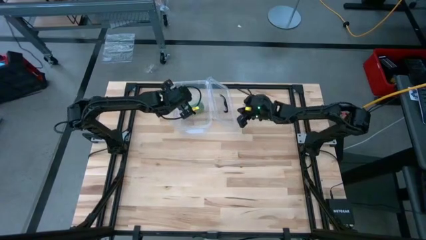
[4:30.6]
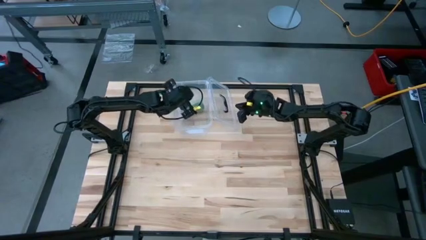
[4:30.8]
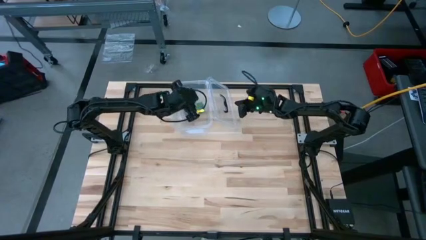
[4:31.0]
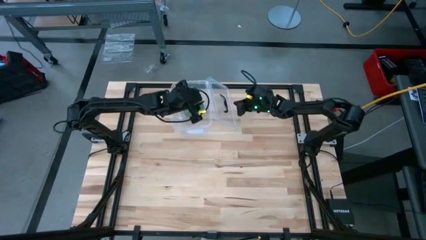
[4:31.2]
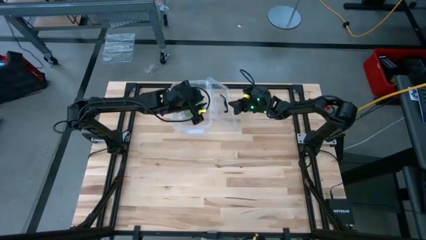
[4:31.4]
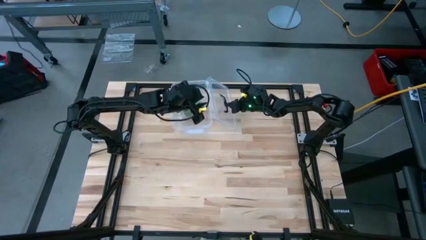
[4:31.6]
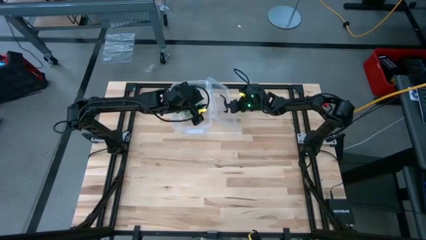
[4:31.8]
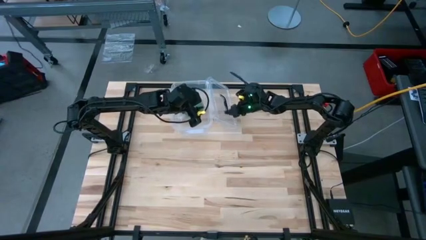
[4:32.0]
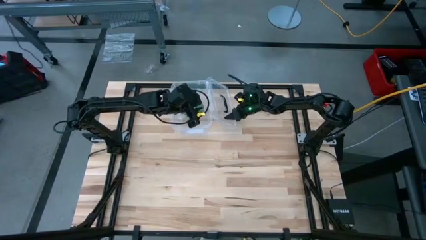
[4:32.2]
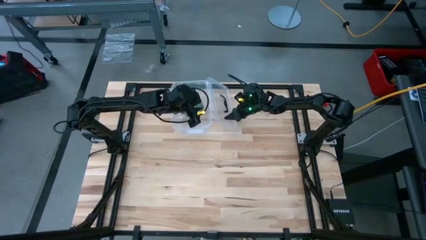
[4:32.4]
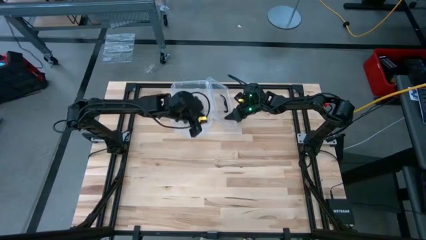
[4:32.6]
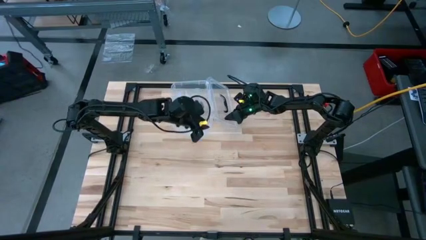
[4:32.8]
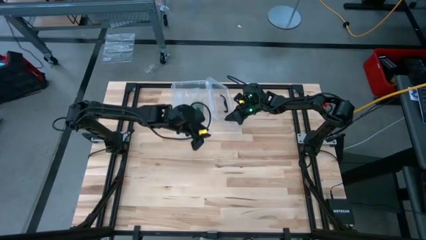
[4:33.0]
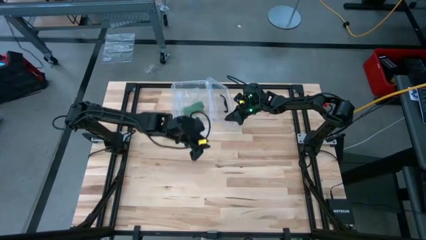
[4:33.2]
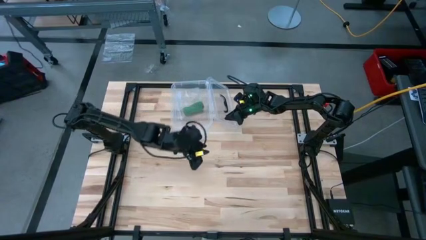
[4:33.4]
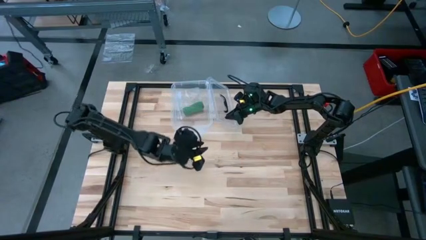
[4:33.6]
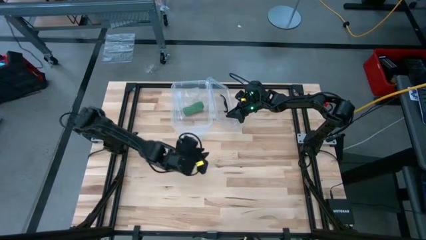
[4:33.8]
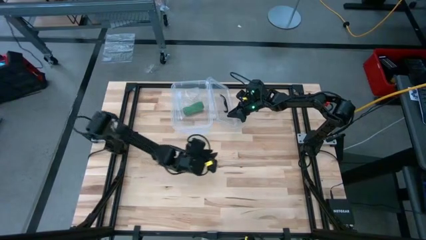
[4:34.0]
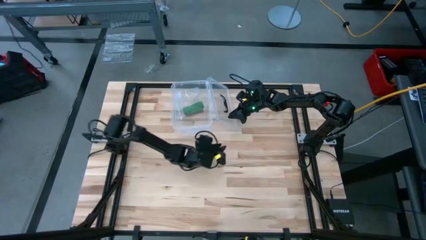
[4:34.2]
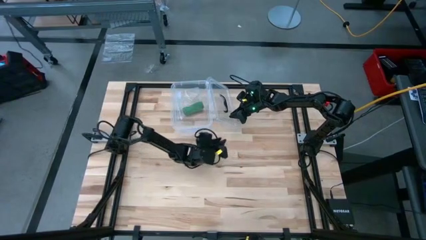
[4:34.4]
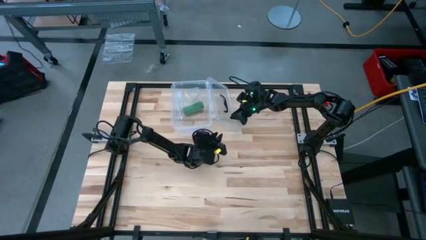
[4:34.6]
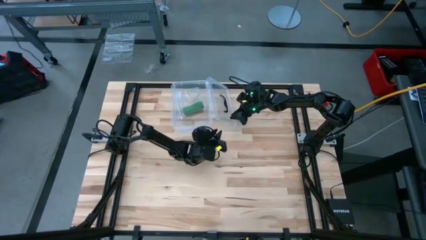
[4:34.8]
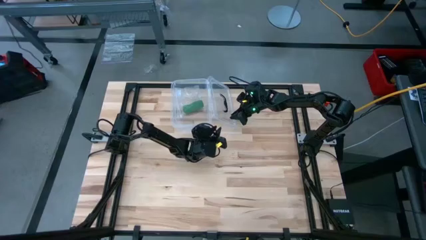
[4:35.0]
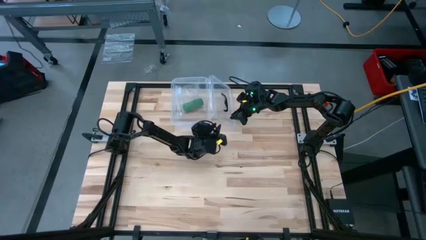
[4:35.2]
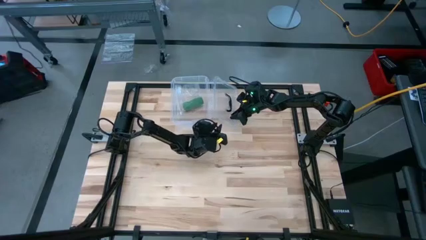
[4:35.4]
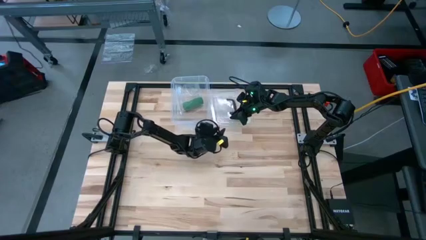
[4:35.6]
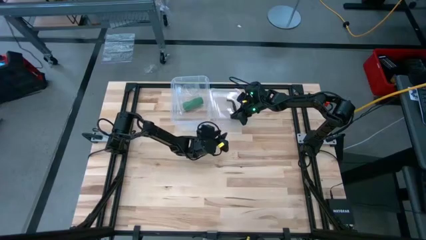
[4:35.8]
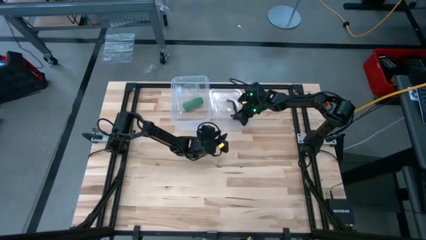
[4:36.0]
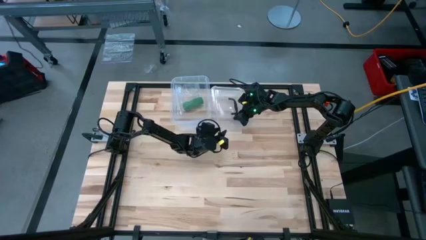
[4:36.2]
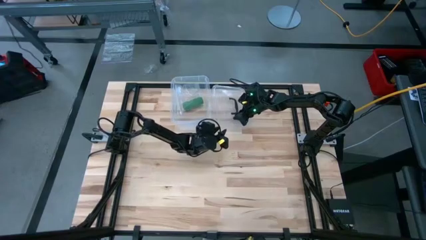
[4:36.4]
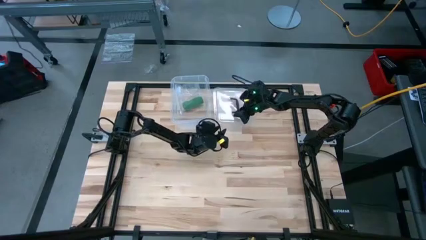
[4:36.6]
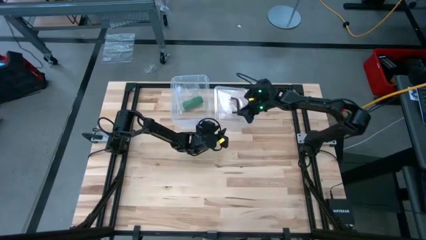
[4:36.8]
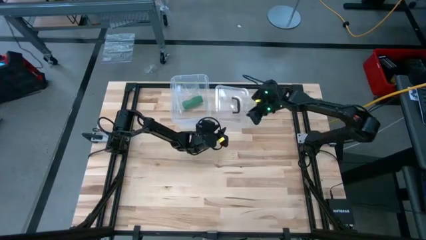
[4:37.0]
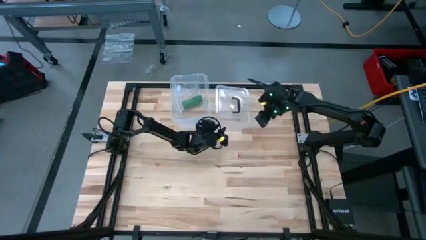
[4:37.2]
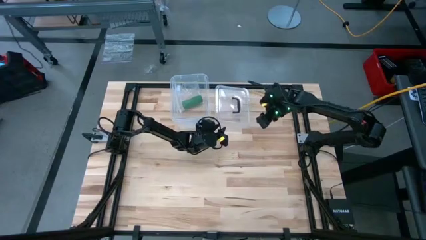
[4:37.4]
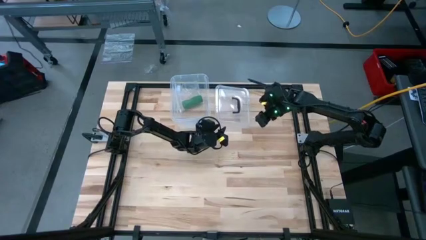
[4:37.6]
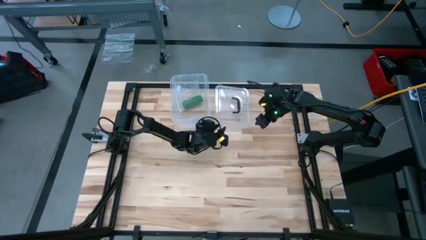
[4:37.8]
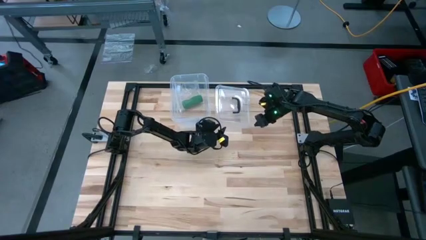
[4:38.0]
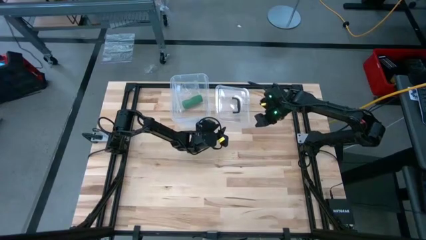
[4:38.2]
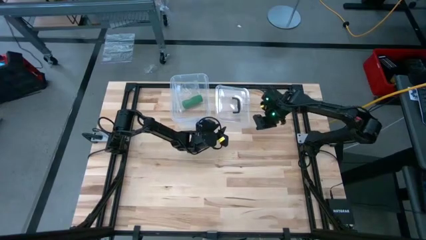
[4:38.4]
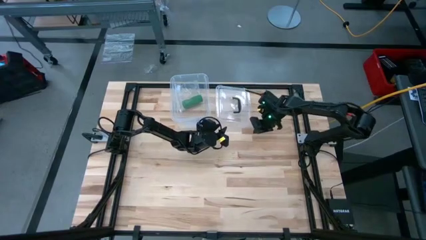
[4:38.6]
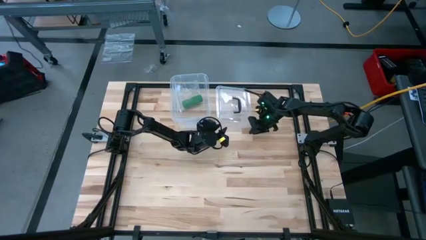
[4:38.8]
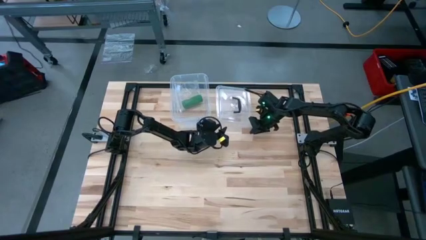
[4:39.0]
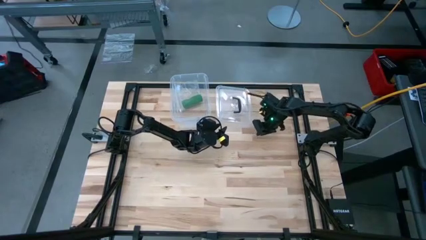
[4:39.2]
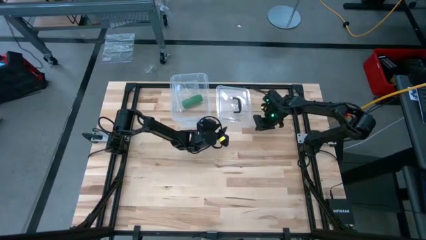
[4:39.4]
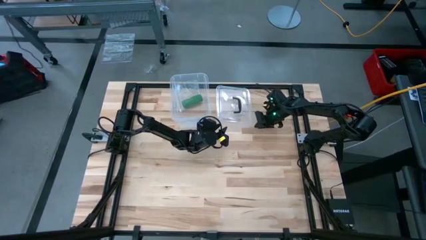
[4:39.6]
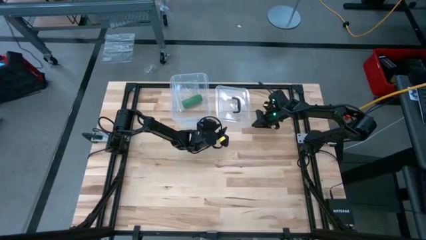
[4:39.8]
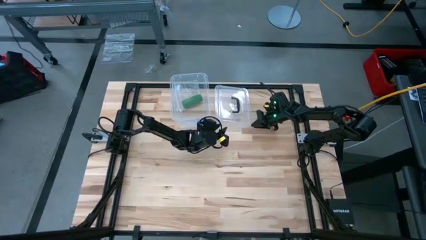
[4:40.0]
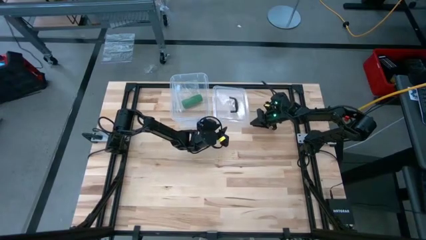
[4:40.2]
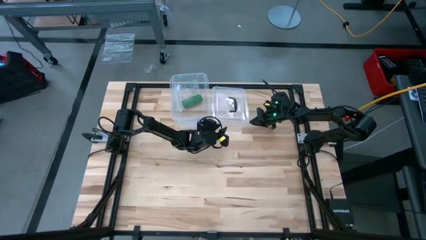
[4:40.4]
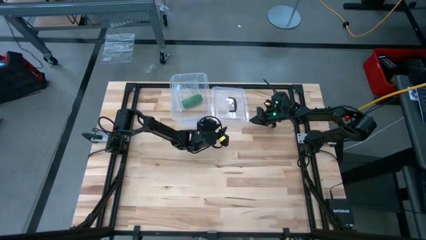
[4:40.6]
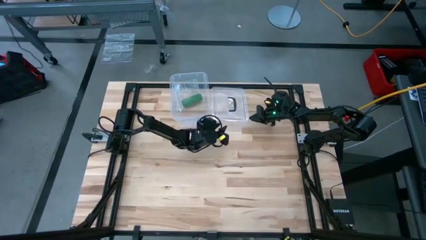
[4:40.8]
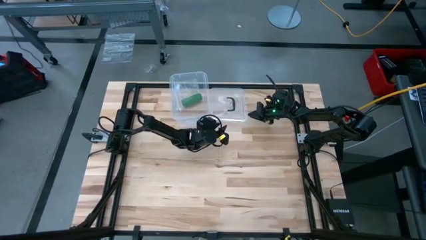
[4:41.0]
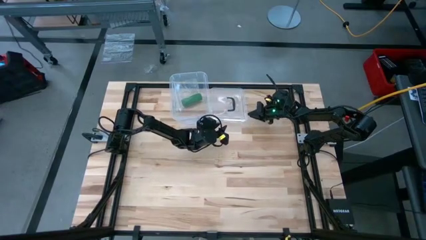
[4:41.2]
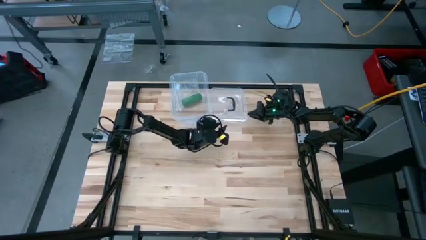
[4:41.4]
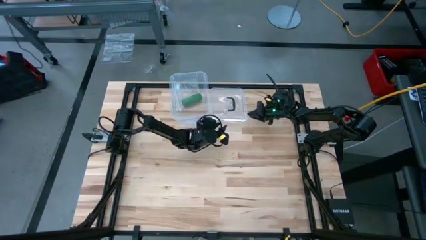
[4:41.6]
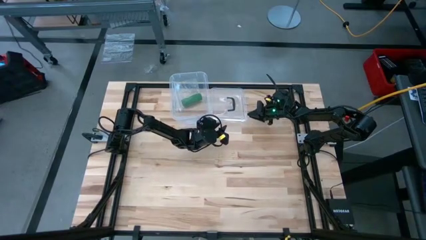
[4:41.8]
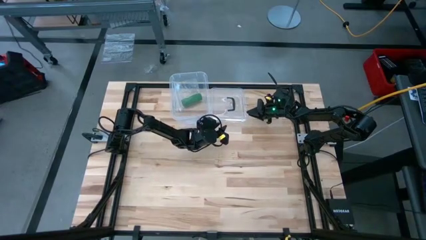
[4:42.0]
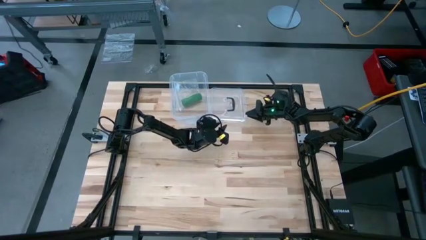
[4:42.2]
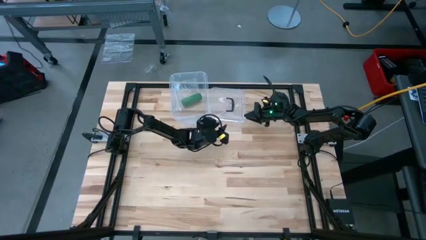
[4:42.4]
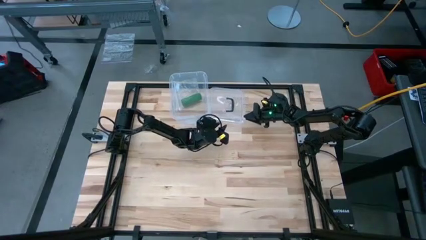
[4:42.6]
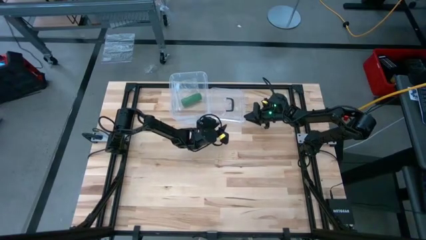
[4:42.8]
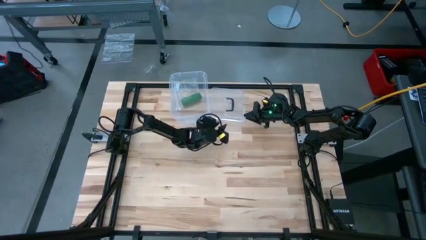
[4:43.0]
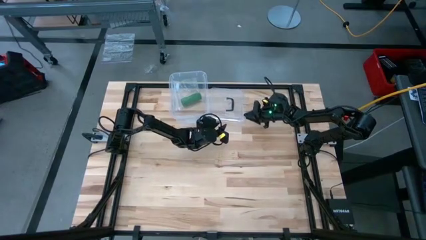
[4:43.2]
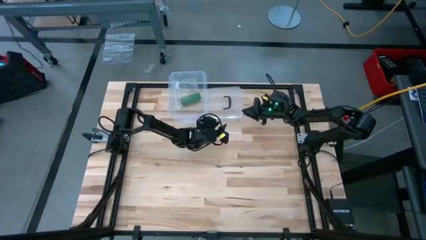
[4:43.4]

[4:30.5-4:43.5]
Task: Roll bandage
Close the transparent bin

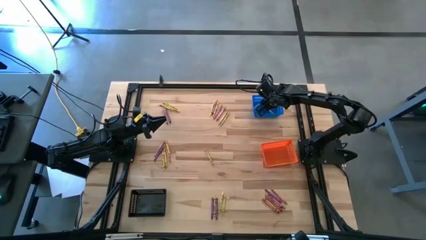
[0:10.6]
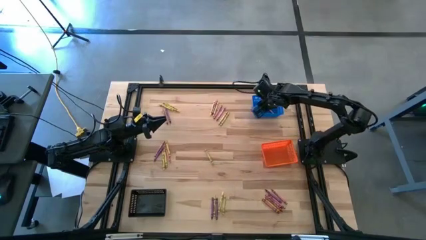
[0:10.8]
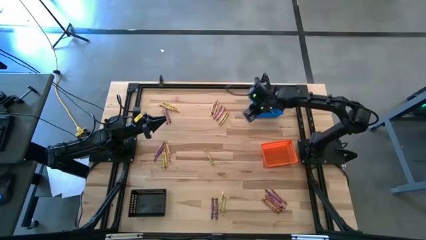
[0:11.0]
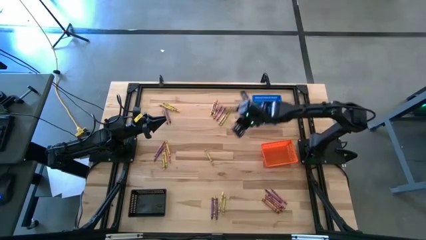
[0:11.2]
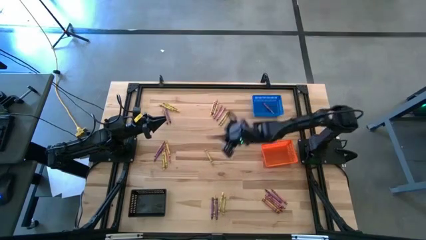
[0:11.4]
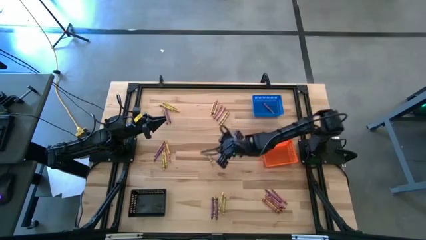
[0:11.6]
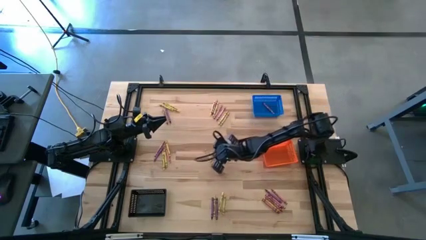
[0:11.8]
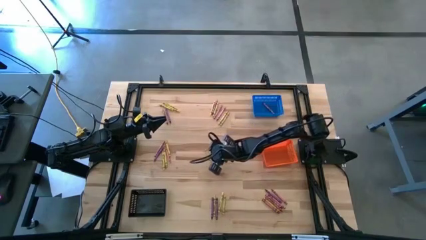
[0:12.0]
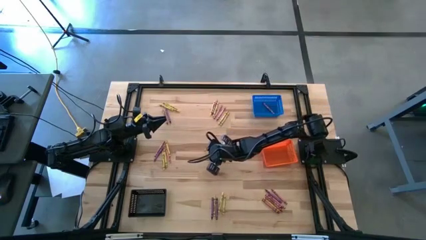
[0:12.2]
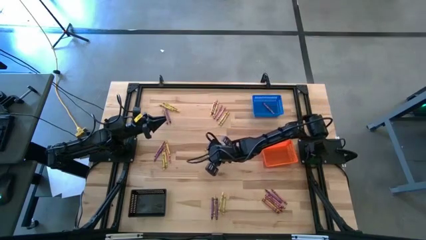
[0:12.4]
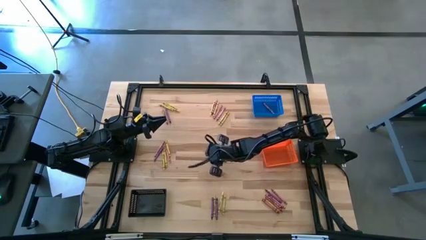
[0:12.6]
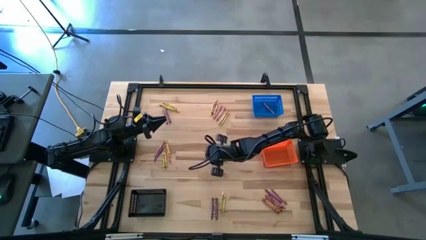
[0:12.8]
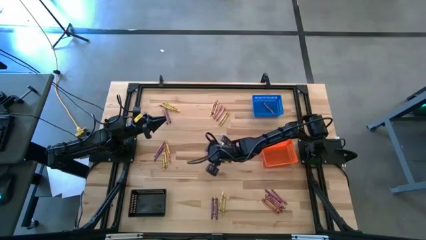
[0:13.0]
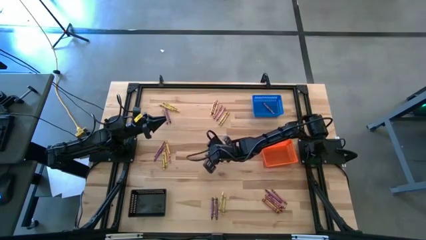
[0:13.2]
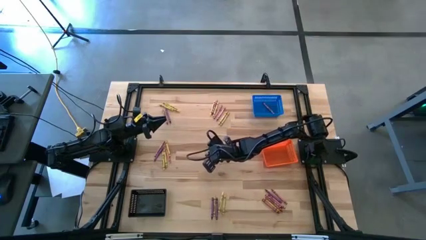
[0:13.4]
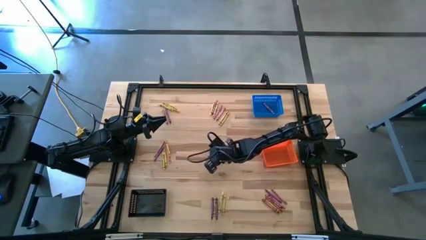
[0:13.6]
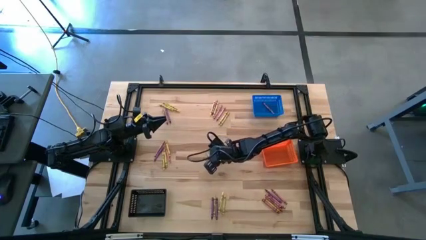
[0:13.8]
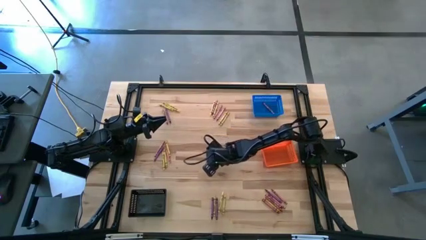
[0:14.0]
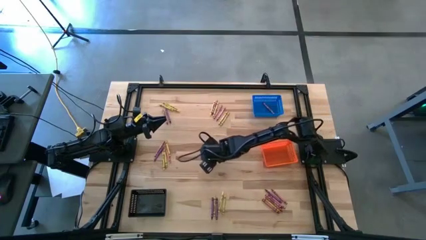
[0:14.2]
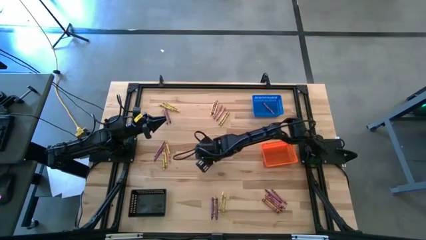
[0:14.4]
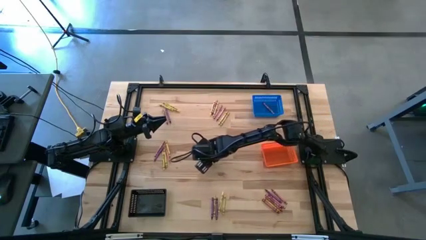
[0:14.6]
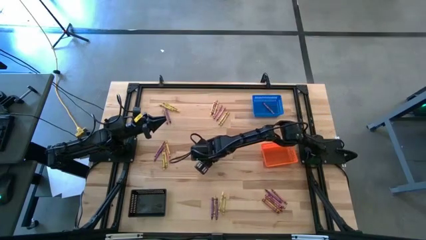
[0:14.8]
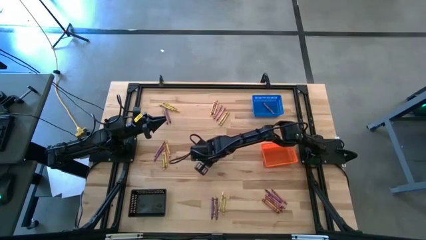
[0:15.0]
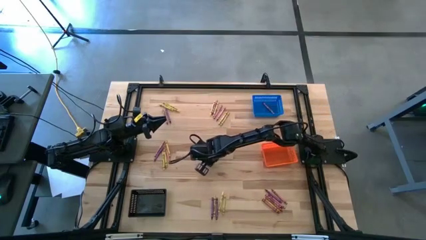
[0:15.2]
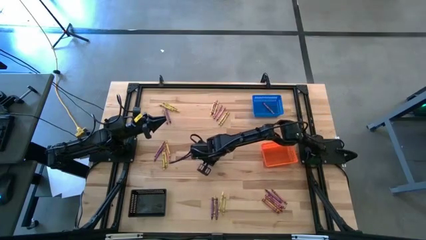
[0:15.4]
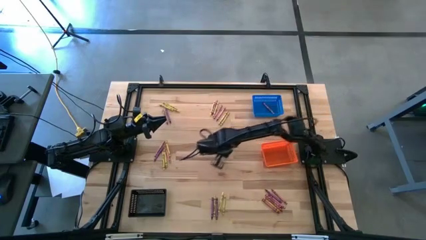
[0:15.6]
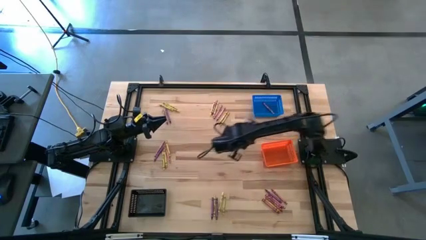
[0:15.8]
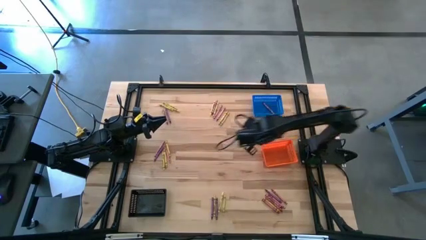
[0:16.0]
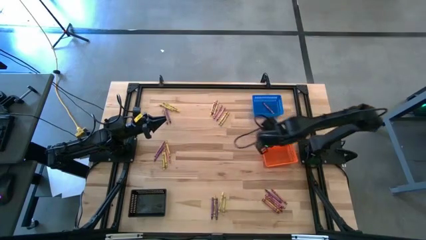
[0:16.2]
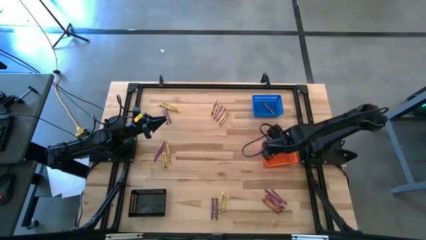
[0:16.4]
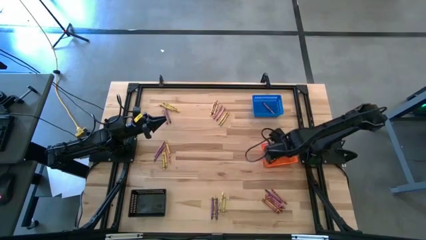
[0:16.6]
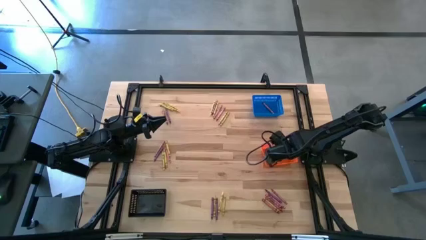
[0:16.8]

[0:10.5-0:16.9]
Task: Sort crayons
Put the yellow crayon into the orange basket
